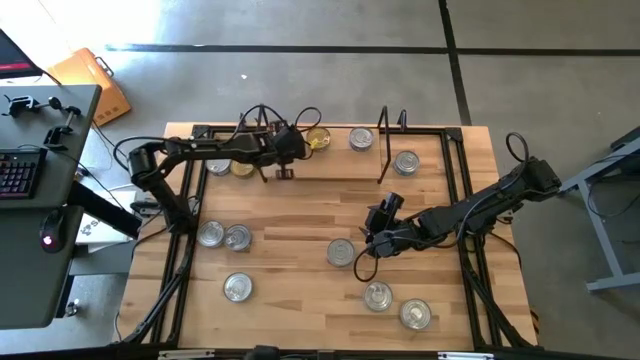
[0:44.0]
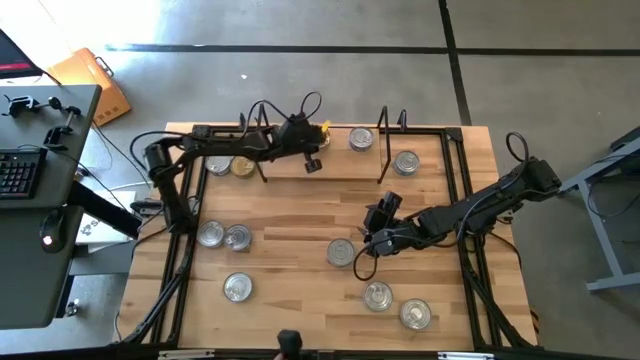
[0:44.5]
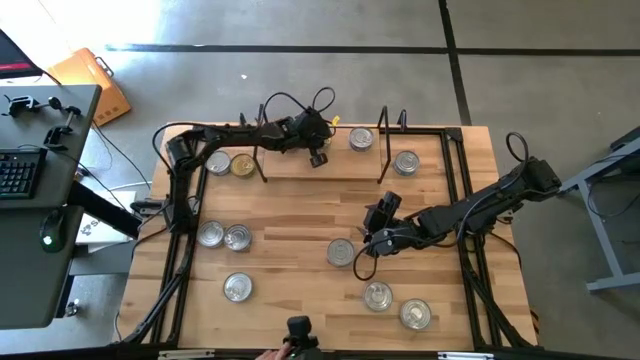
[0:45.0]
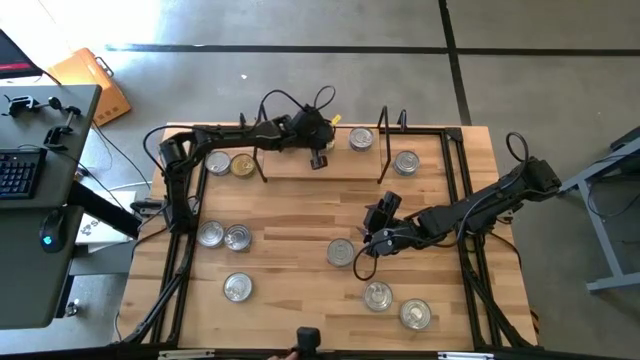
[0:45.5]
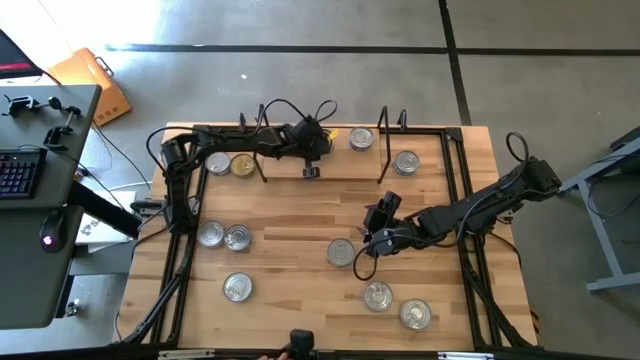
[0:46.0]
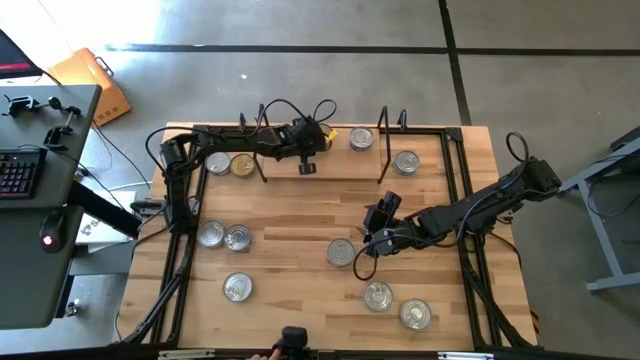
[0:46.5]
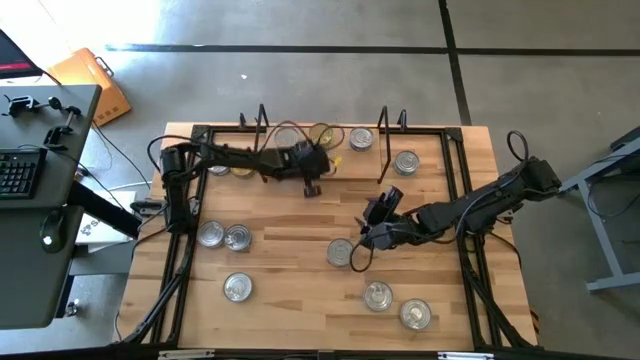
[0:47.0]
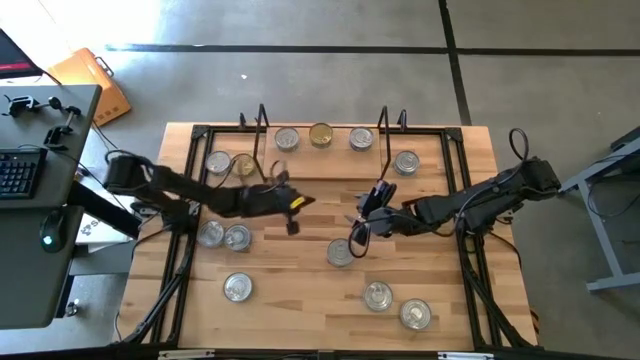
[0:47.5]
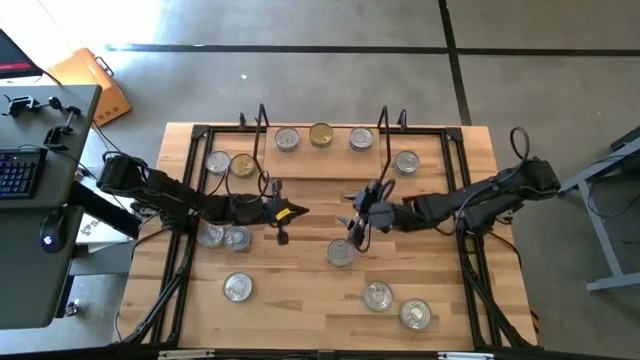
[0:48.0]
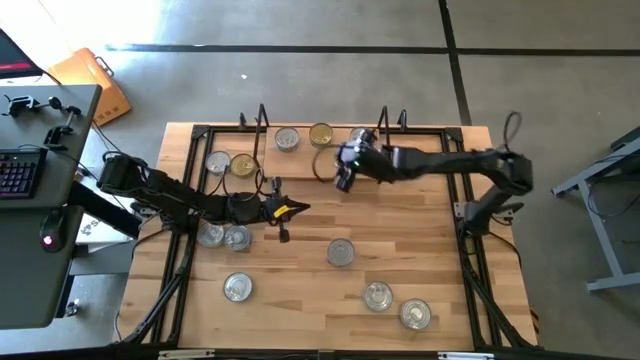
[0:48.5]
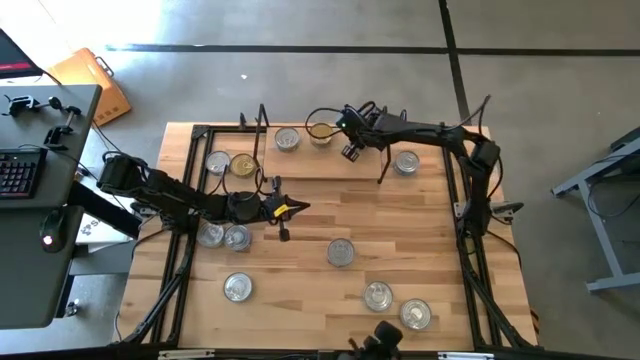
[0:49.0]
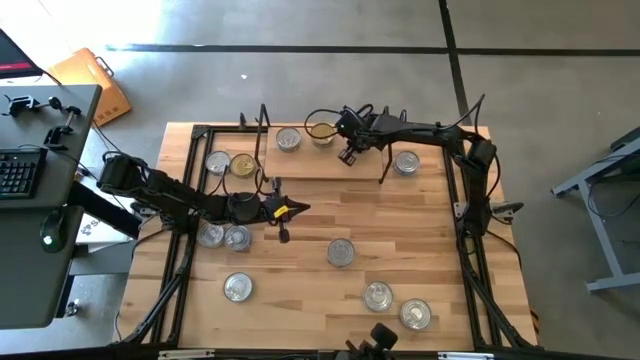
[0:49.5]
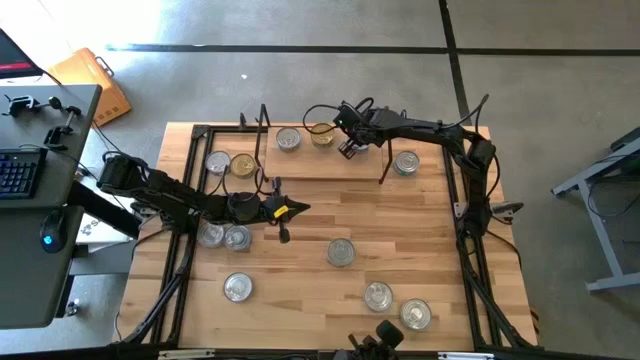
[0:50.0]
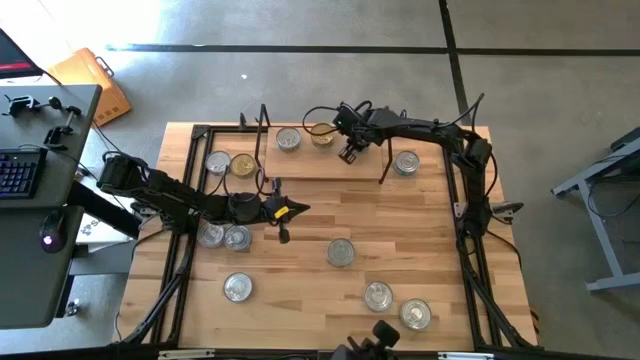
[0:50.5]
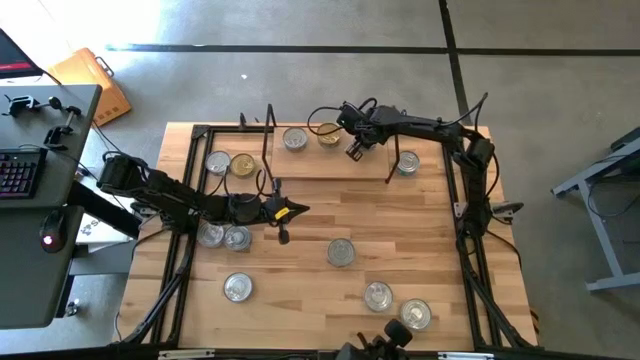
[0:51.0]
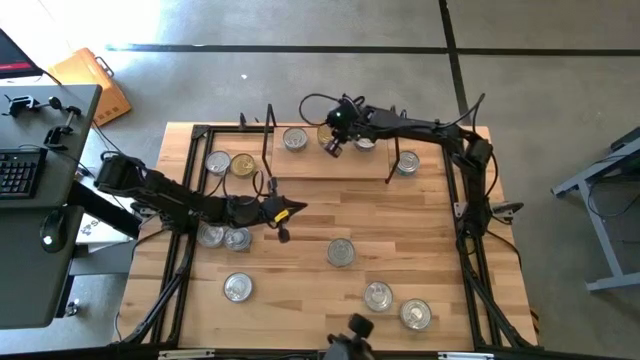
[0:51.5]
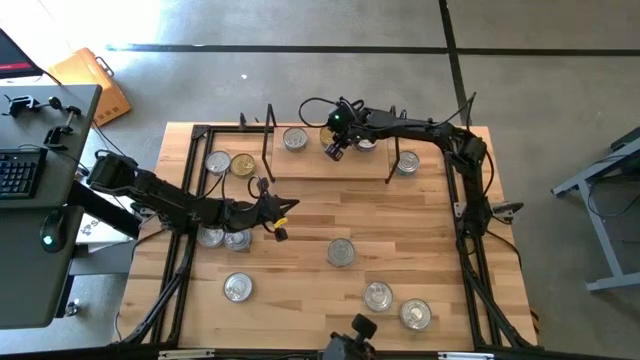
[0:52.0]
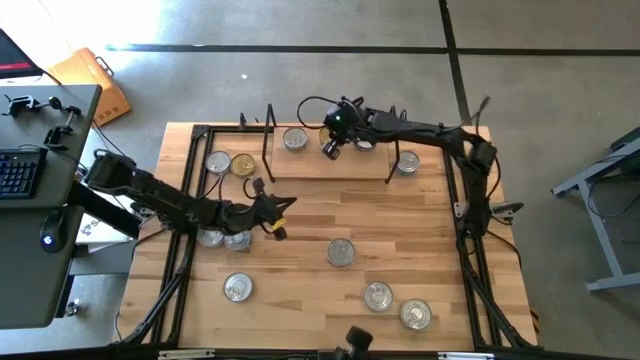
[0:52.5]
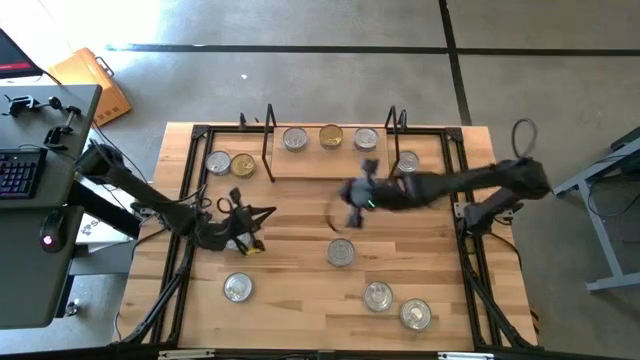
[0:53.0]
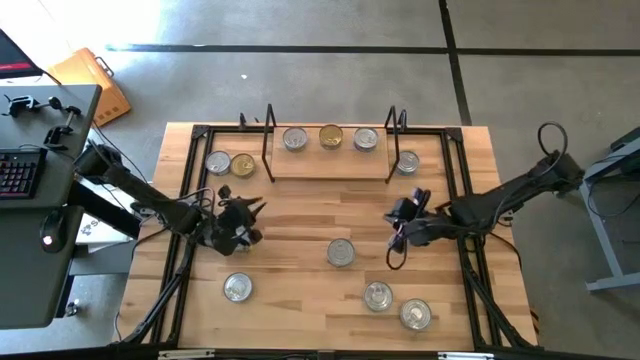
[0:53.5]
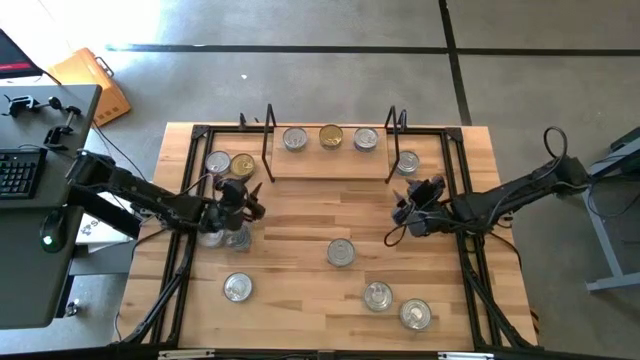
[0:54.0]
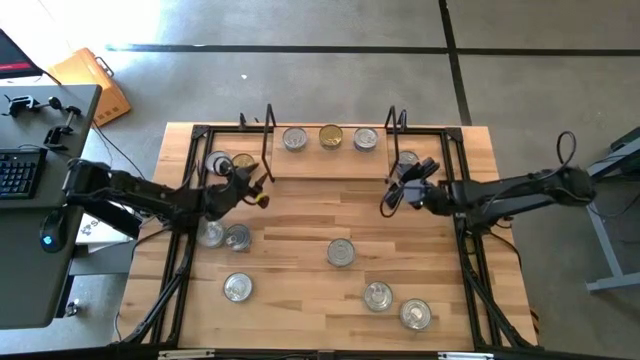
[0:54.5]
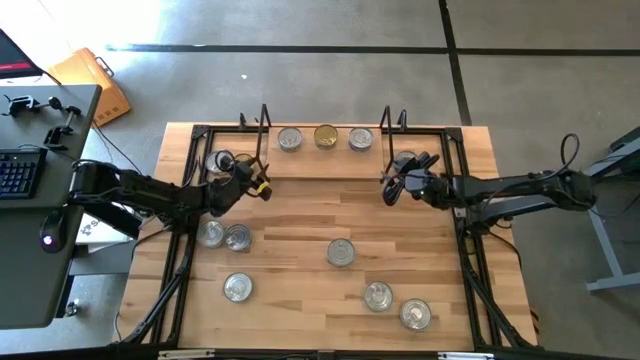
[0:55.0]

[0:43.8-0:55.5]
Task: Stack canned seafood by type on shelf
Adjust the tuna cans and shelf

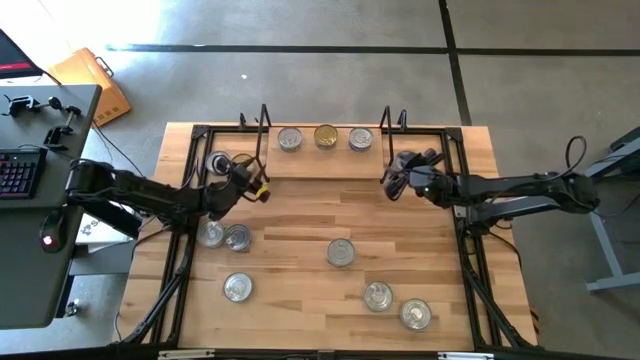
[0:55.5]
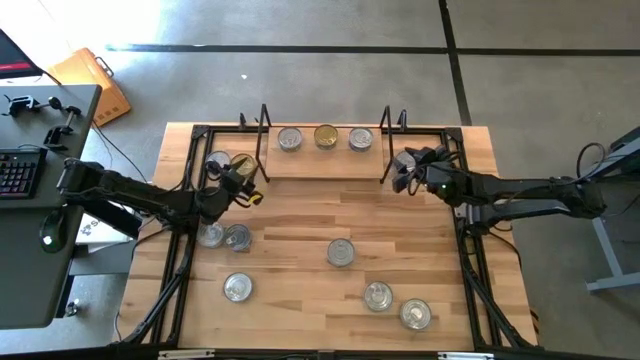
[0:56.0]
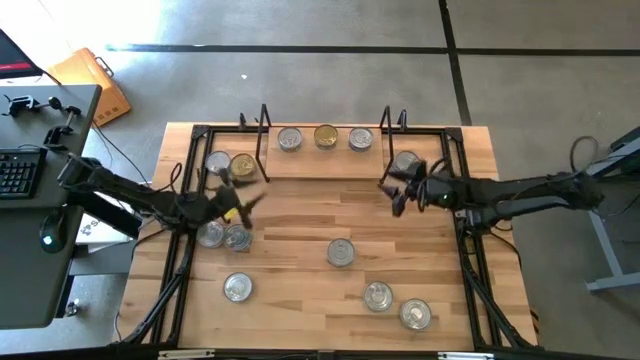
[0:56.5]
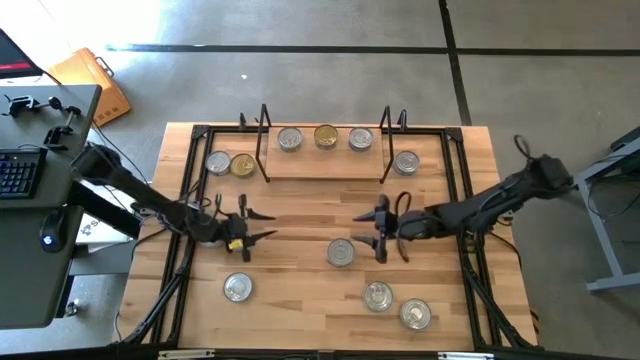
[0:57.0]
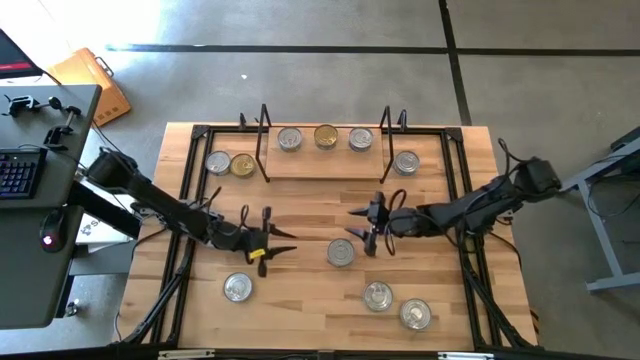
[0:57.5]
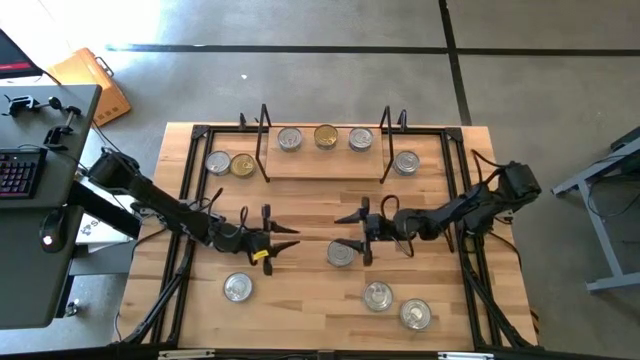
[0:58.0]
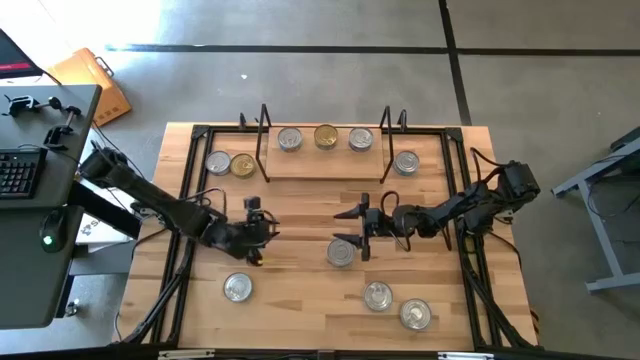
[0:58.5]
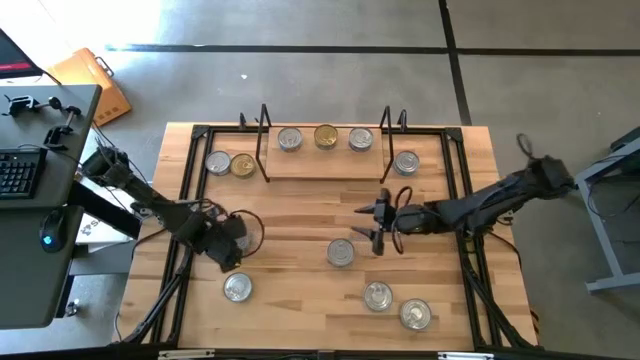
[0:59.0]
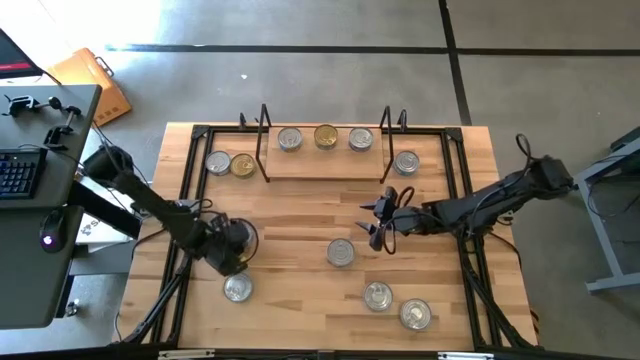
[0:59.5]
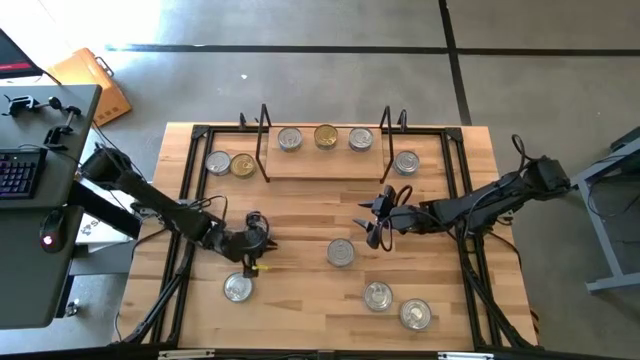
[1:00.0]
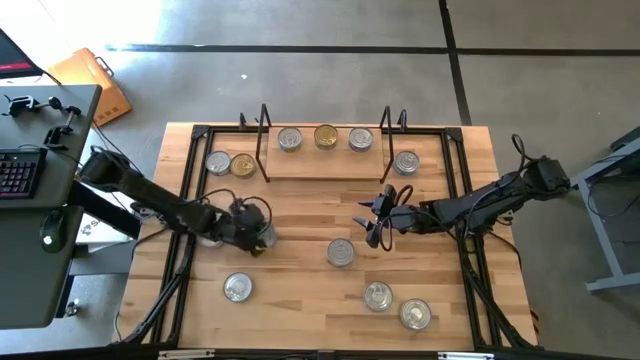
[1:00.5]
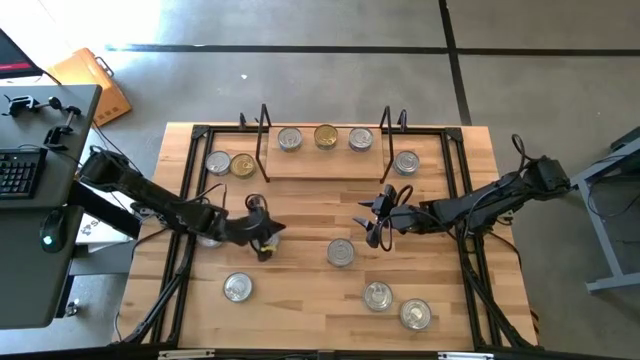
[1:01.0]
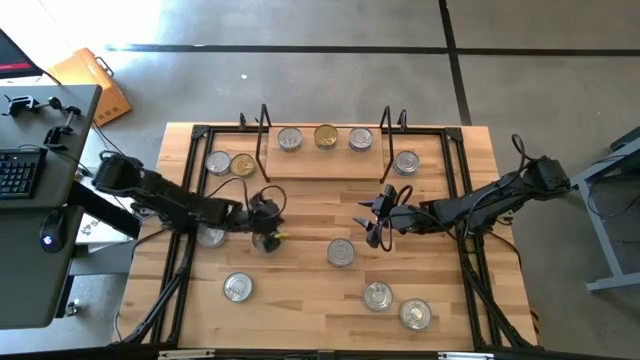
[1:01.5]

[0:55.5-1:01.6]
Put the blue tuna can on the shelf aligned with the other blue tuna can

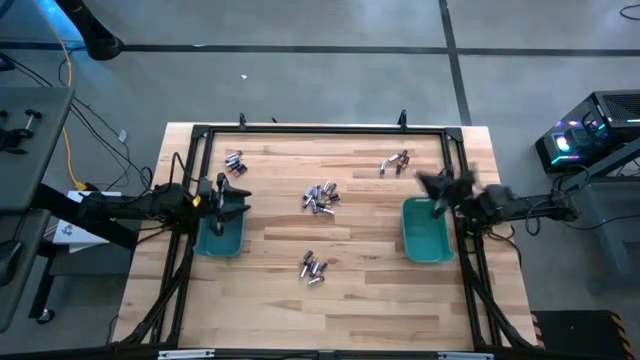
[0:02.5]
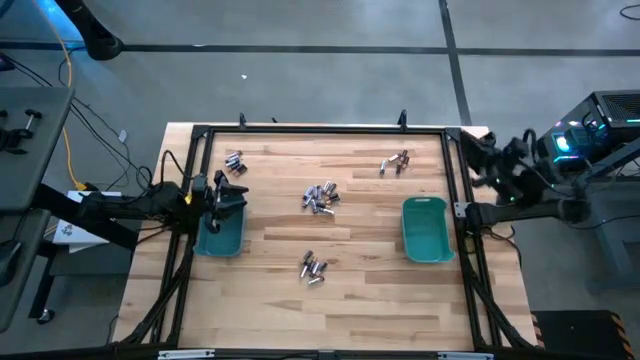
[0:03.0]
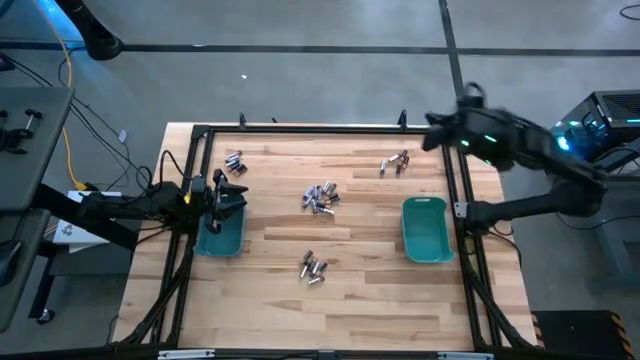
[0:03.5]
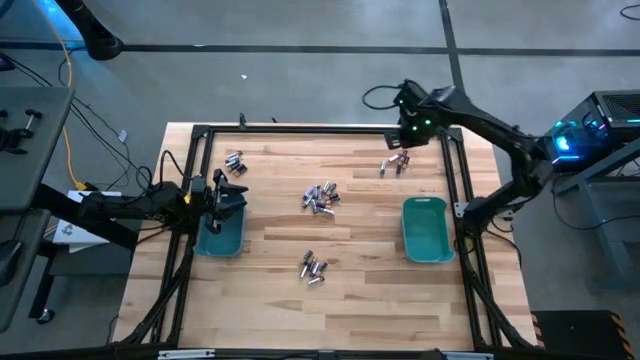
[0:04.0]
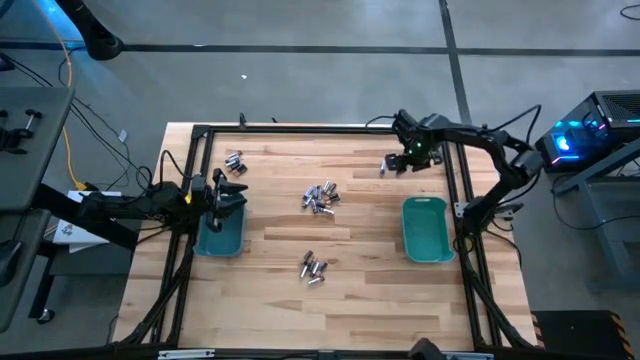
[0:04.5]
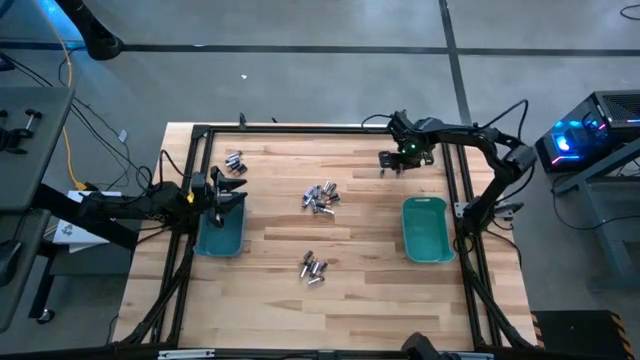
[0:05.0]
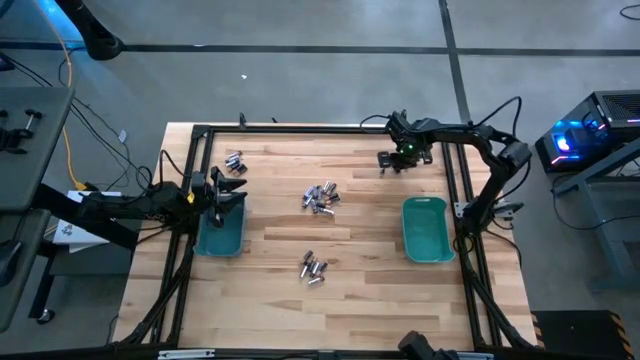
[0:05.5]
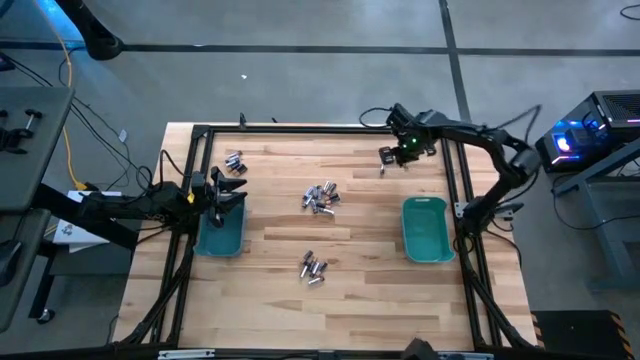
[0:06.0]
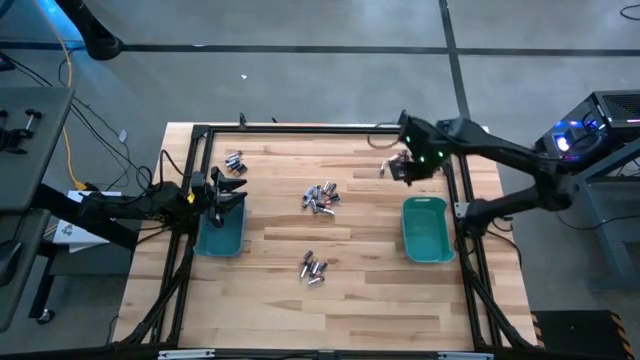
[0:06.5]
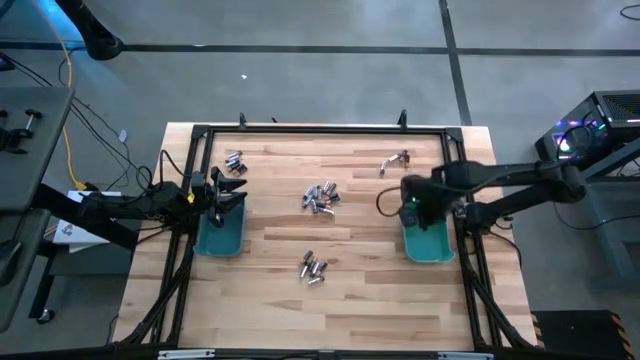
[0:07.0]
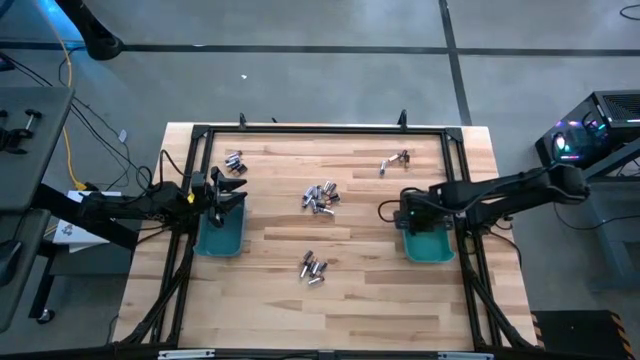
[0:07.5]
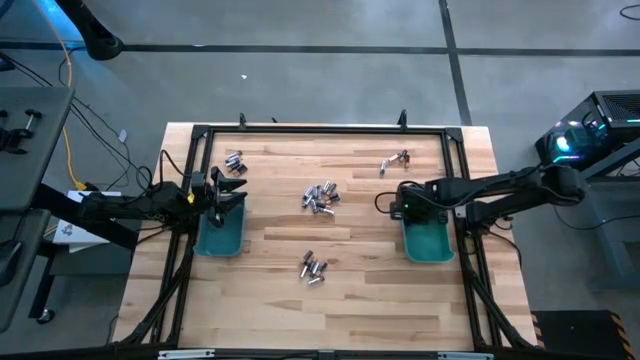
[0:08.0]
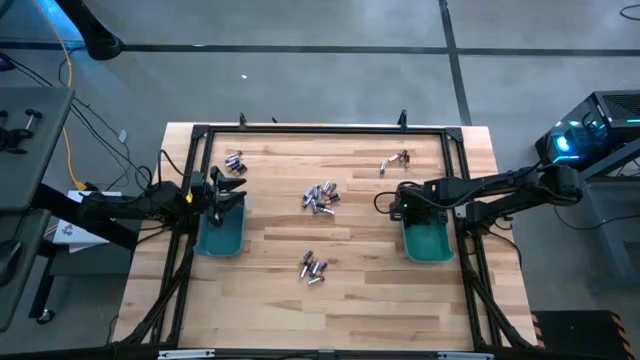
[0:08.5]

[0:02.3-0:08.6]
Task: Sort batteries
Put the black battery into the green bin
